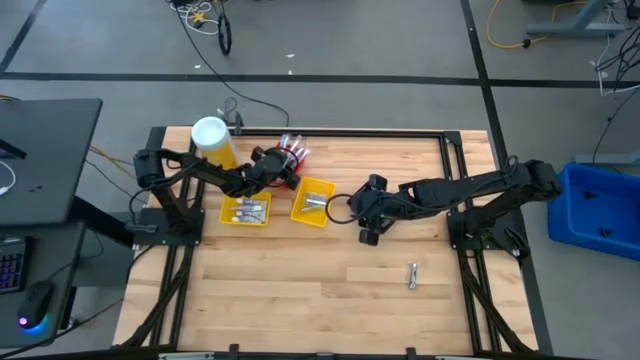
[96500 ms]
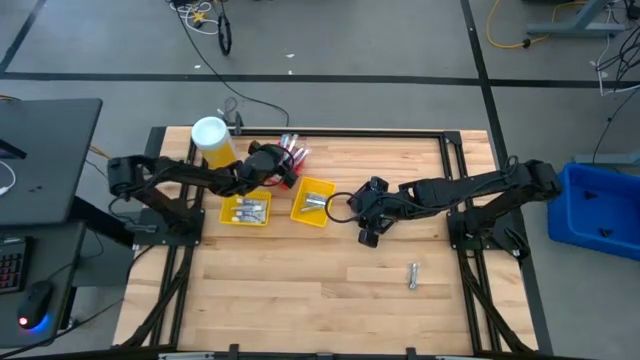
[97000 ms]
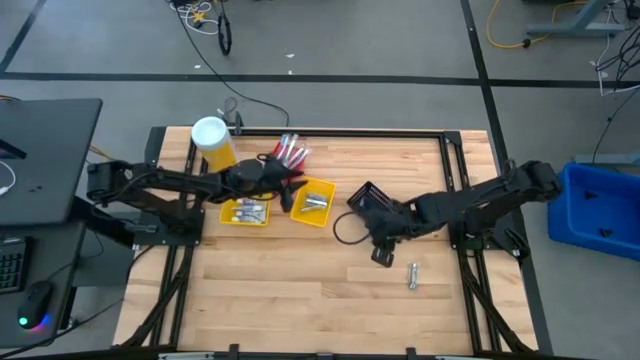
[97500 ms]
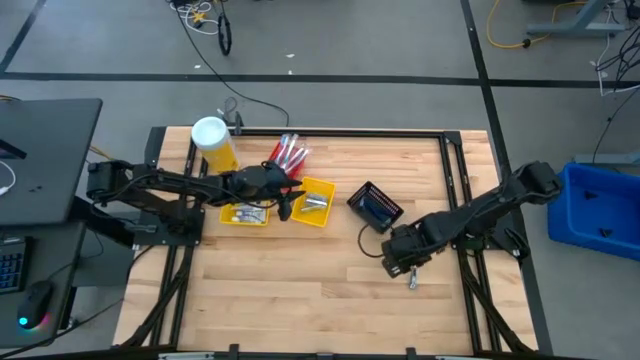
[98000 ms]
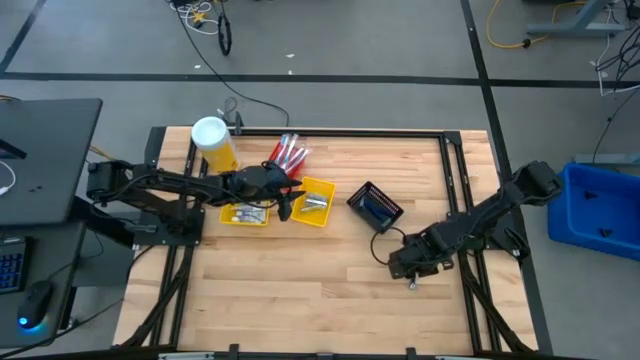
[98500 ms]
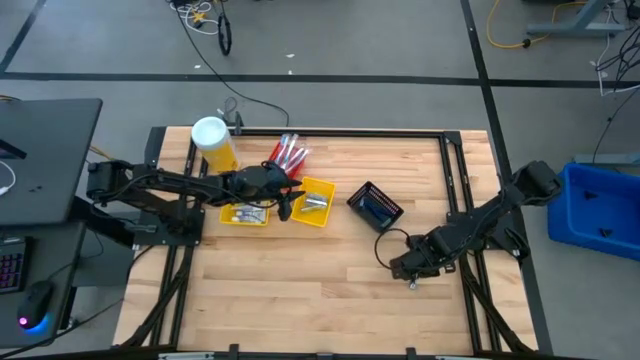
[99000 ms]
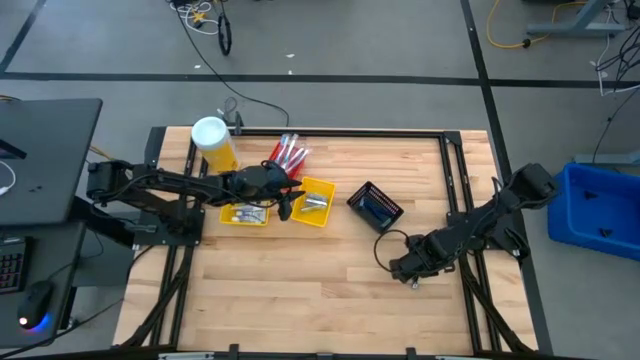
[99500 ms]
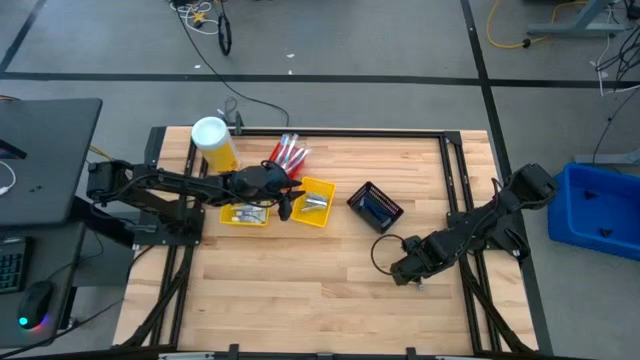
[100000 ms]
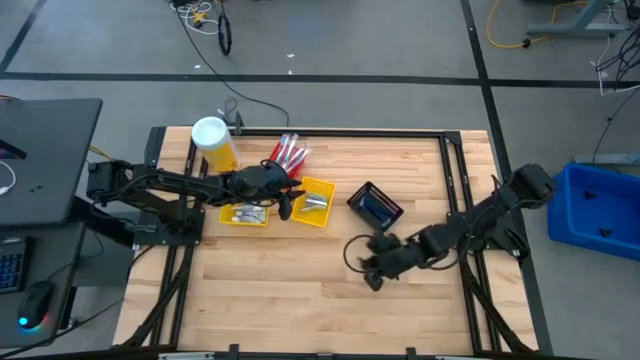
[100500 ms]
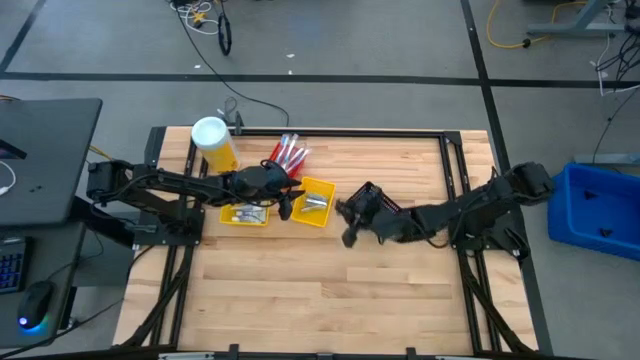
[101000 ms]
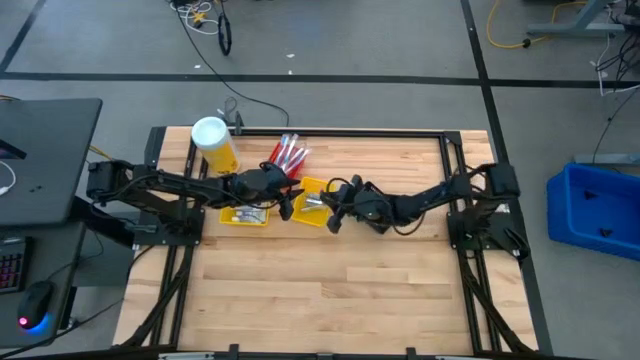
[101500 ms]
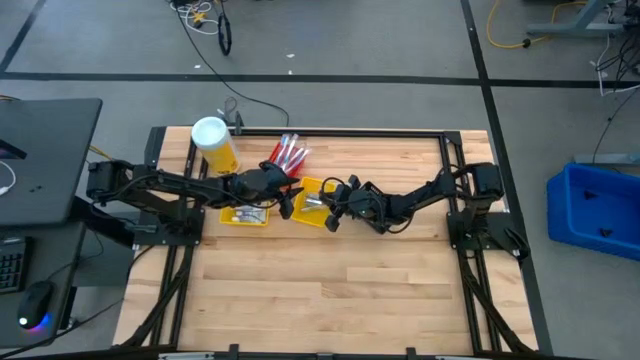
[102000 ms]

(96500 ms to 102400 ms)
Task: Pick & Place Travel size toiletries
Put the silver nail cutter into the right yellow bin

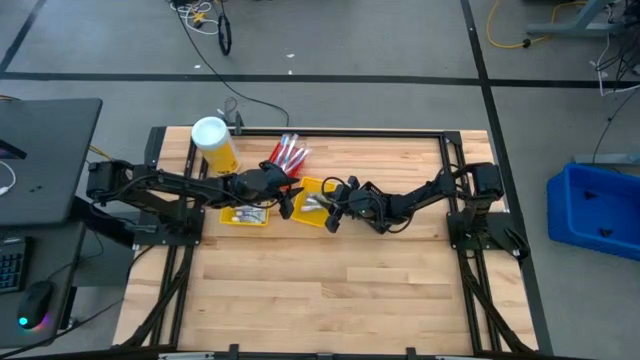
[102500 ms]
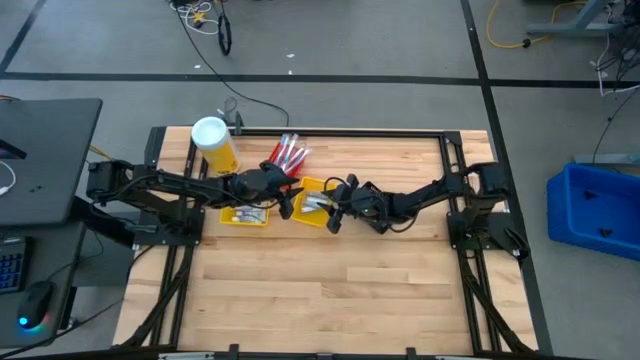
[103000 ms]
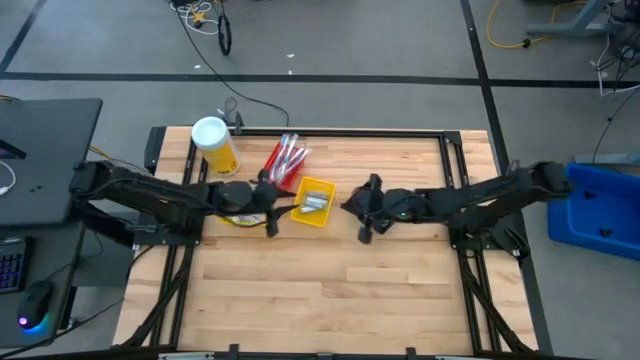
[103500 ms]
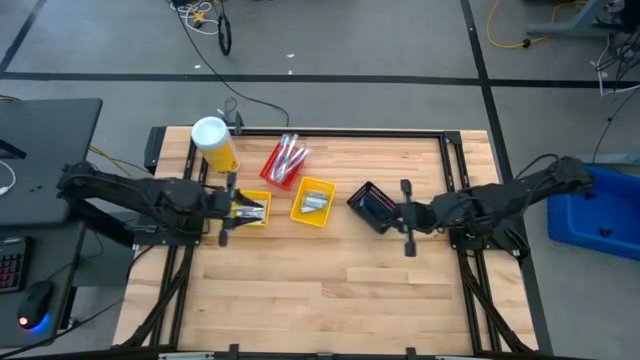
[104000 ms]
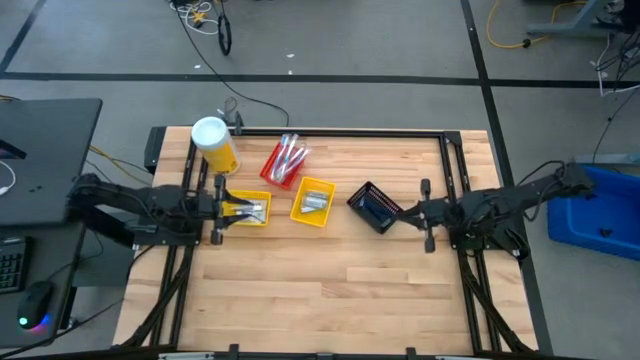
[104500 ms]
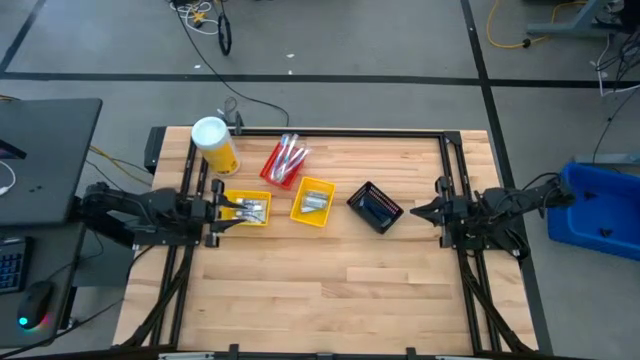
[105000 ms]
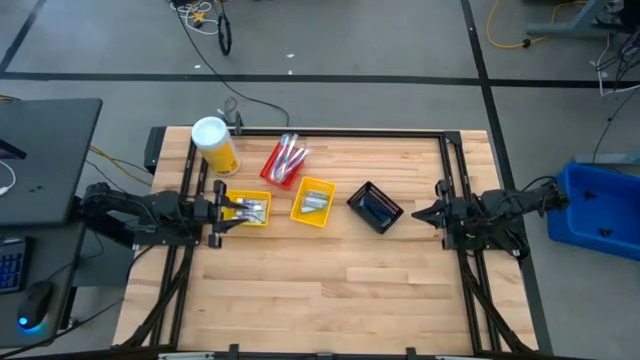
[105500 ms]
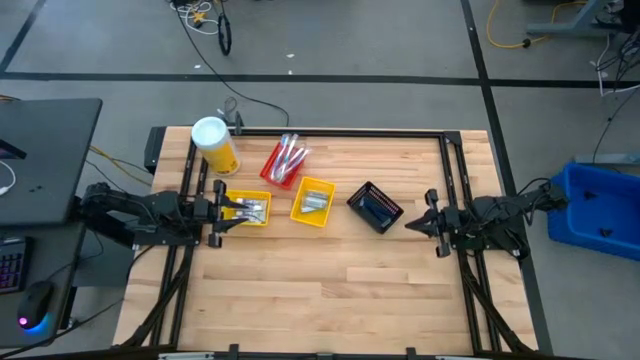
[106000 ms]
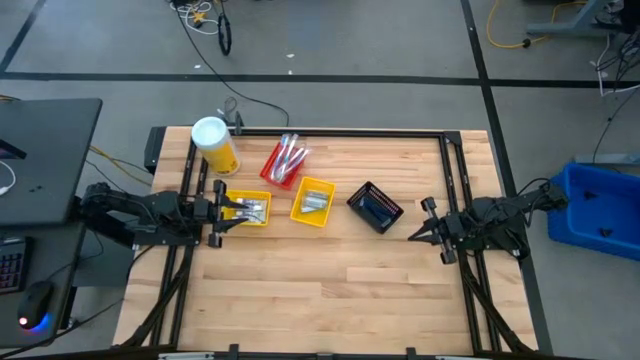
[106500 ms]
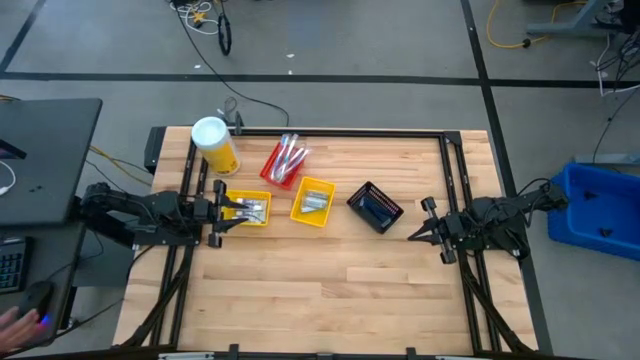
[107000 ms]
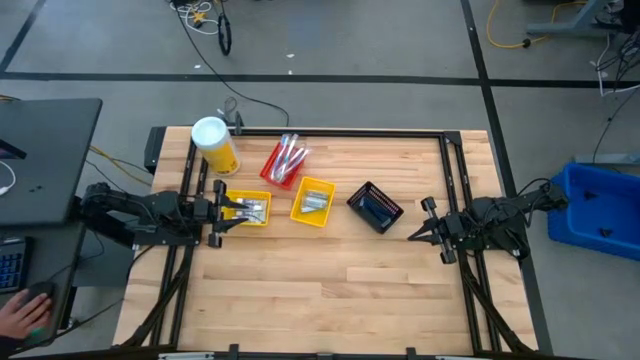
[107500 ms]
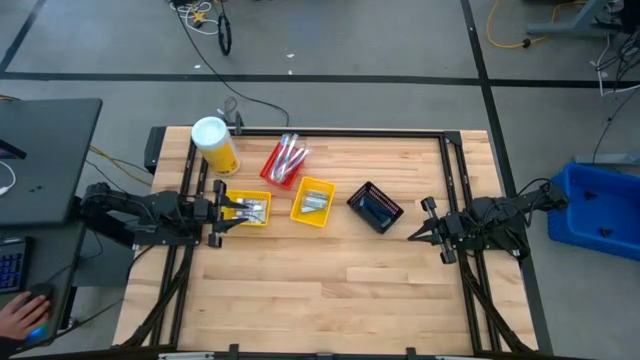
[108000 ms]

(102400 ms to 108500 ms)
Return to Home Position

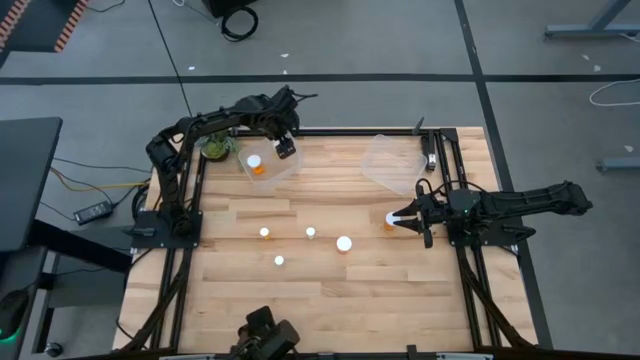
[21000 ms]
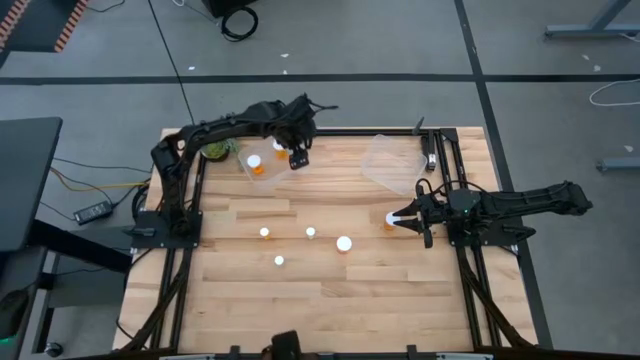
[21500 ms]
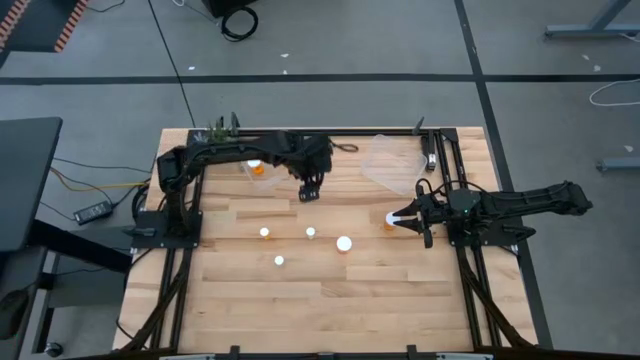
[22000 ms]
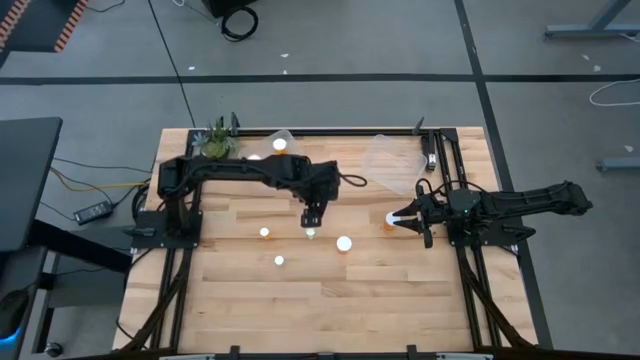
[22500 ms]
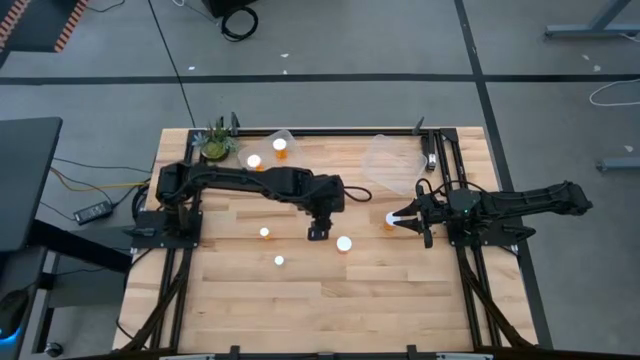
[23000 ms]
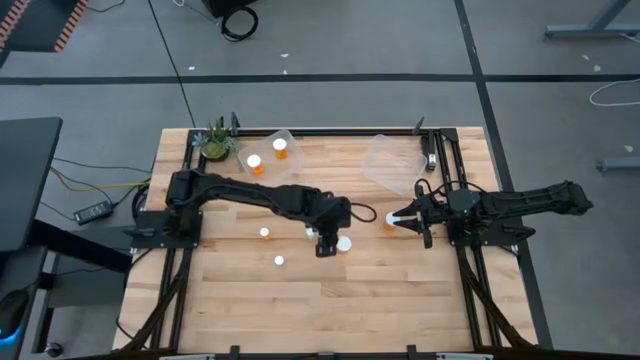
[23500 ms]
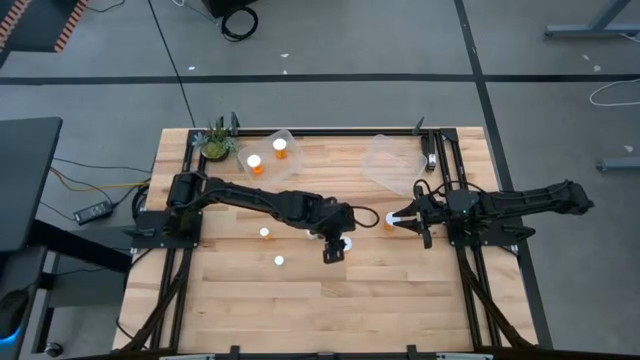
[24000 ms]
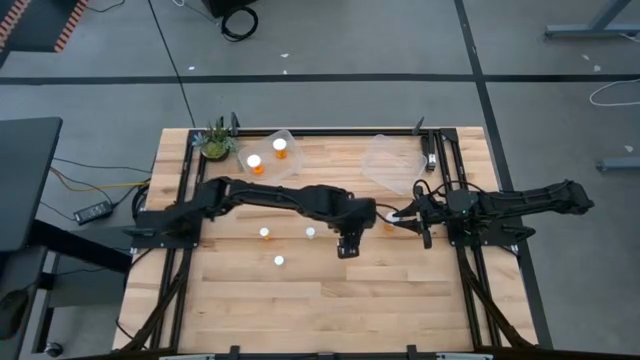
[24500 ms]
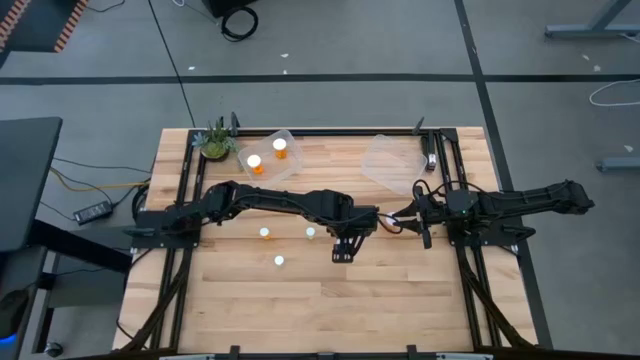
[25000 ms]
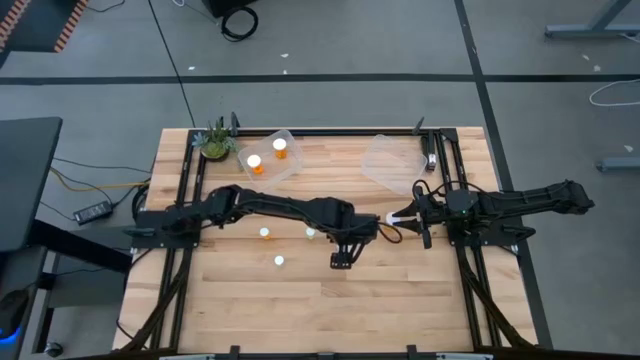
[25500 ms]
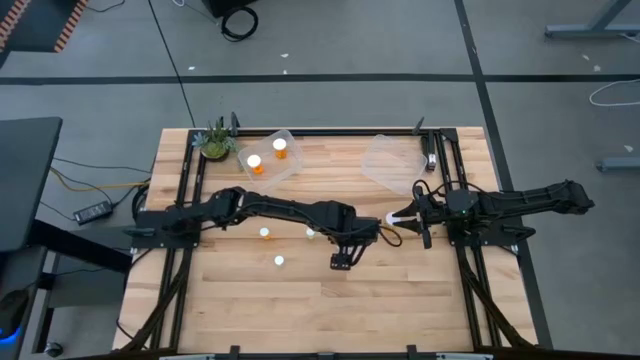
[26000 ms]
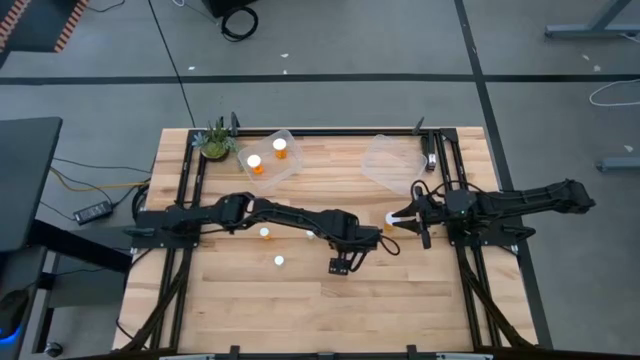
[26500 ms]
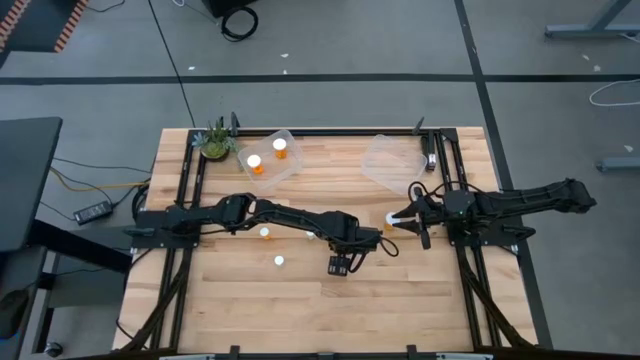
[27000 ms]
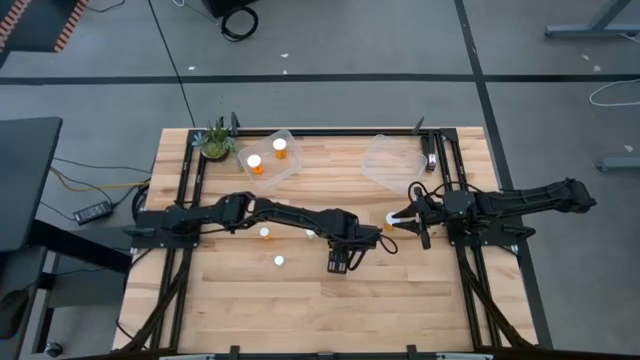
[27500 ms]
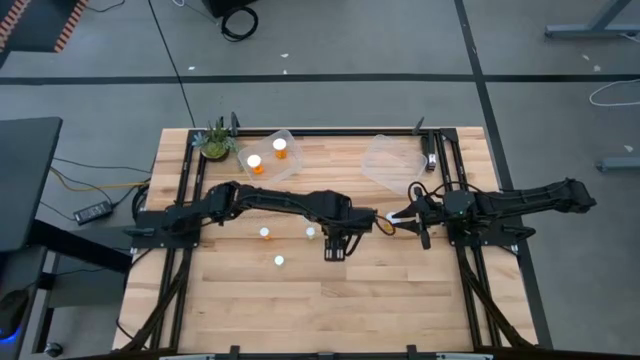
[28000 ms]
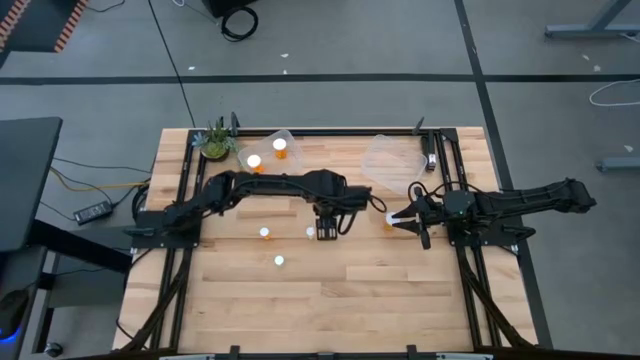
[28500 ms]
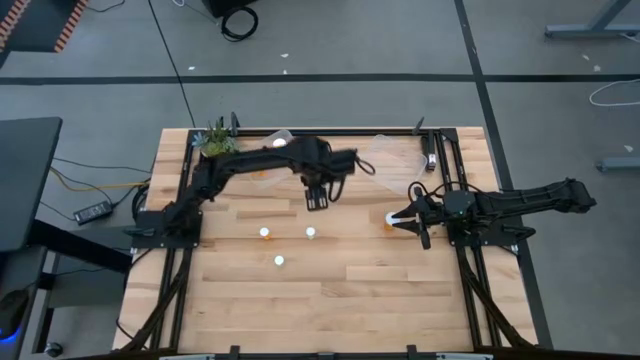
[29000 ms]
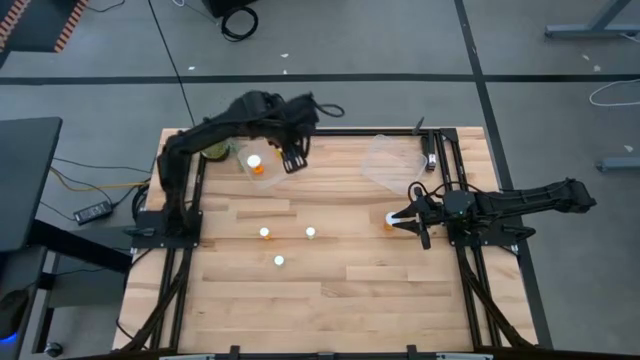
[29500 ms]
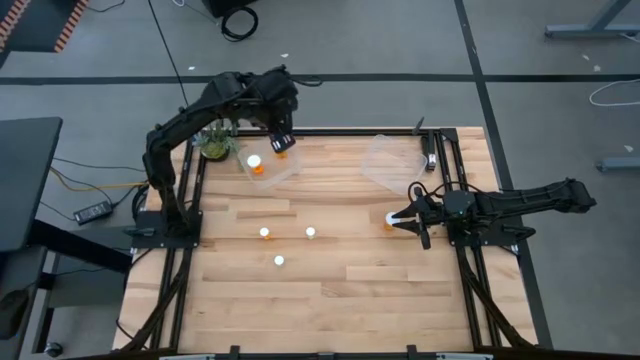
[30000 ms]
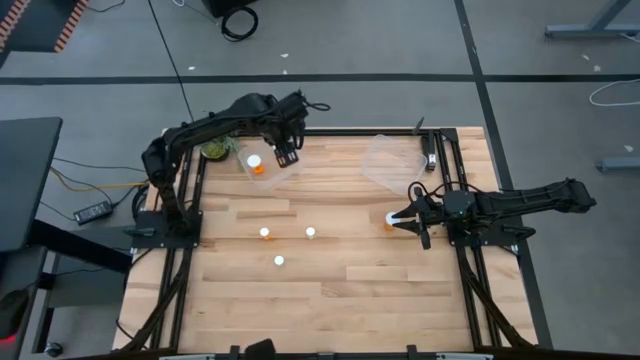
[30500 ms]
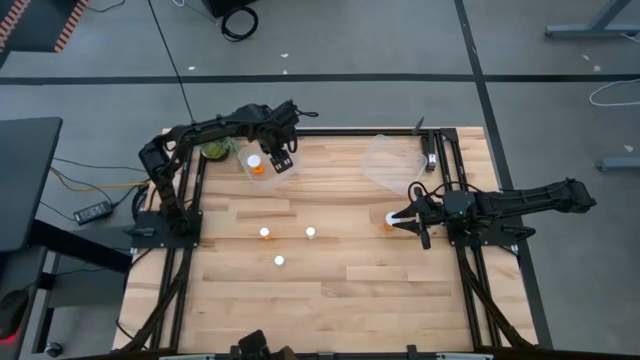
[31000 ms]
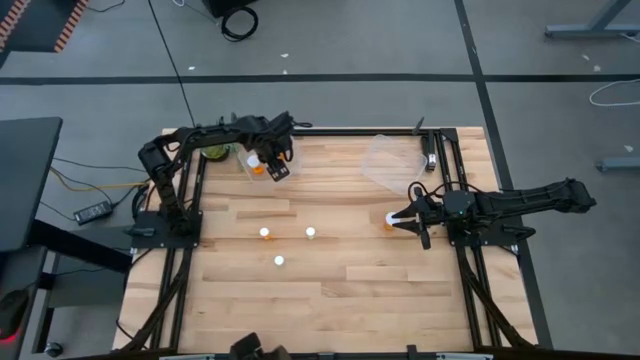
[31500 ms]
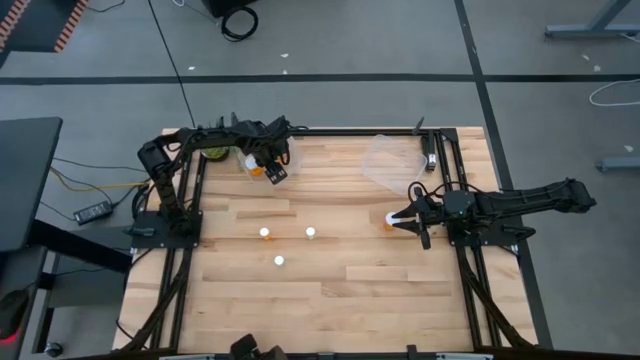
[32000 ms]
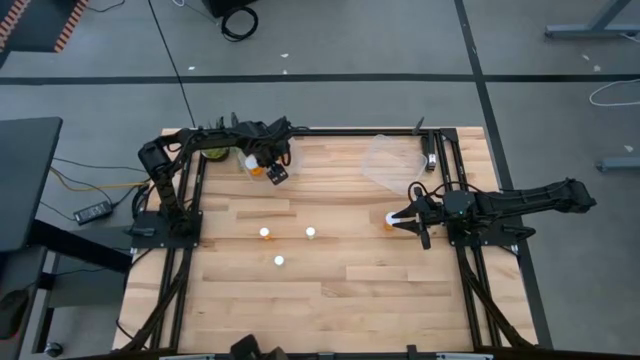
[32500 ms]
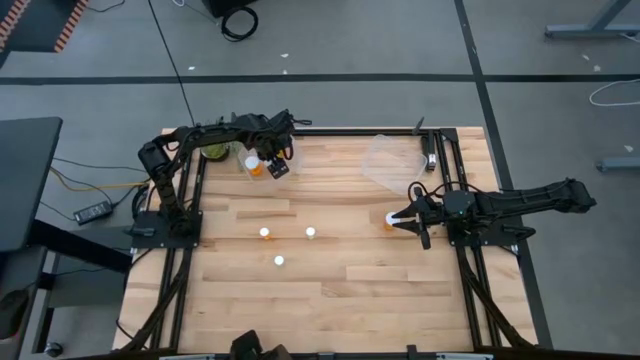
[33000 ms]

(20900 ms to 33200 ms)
Task: Pick and place medicine bottles into bin by pill shape (circle, oval)
Put the orange capsule bottle into the left transparent bin
